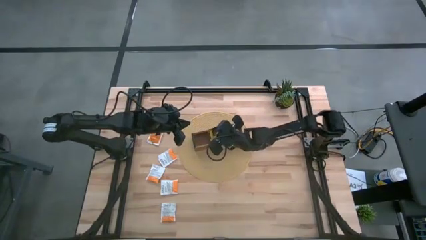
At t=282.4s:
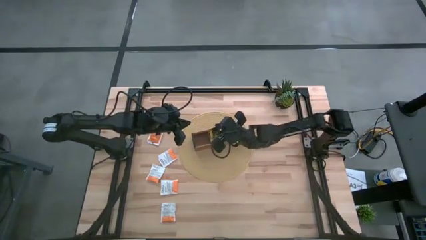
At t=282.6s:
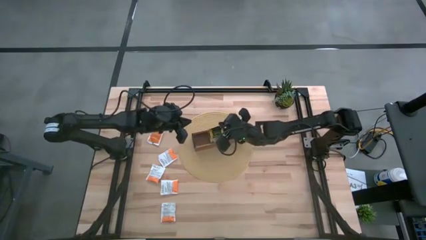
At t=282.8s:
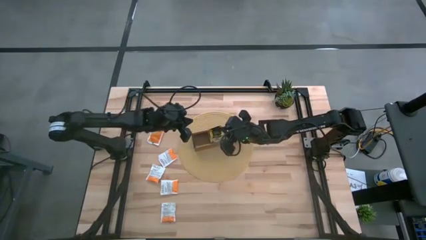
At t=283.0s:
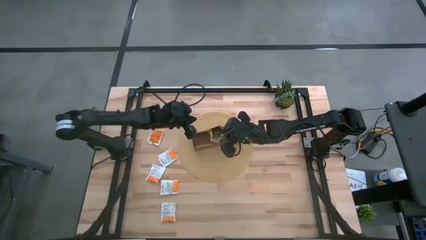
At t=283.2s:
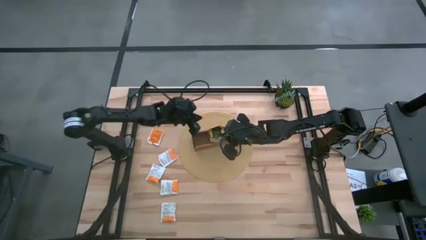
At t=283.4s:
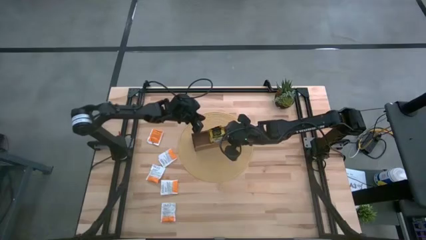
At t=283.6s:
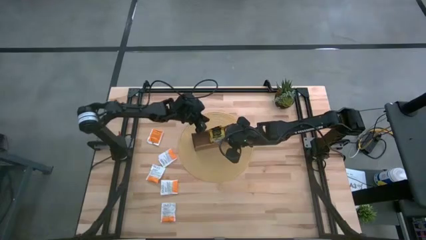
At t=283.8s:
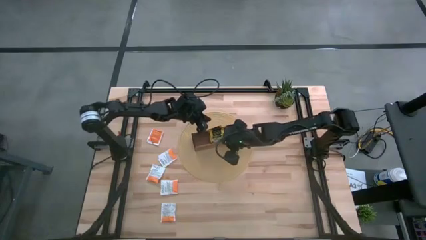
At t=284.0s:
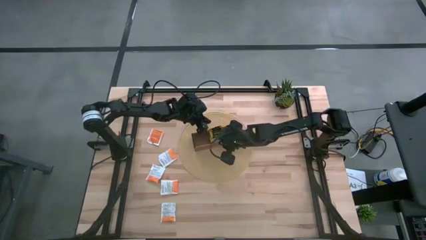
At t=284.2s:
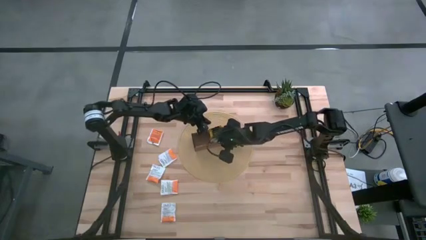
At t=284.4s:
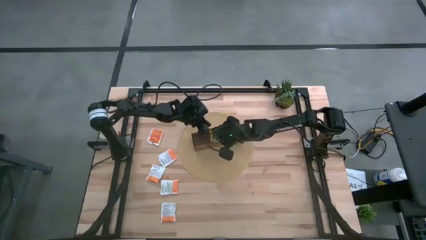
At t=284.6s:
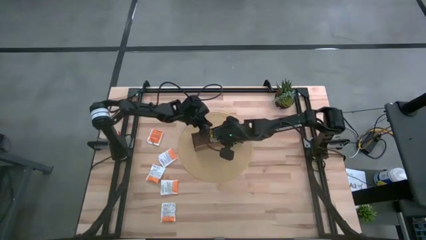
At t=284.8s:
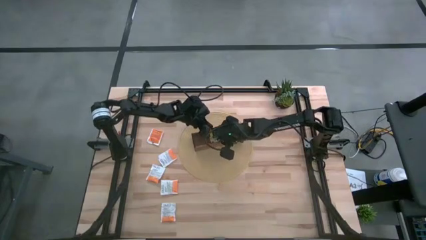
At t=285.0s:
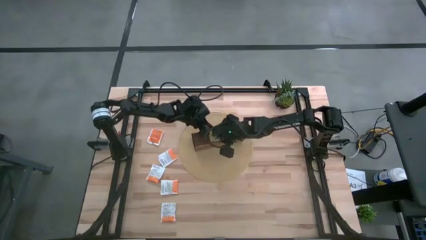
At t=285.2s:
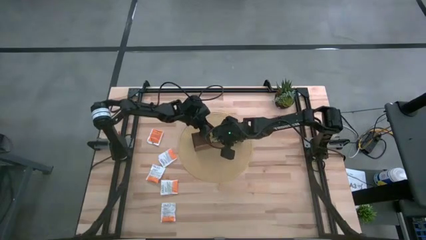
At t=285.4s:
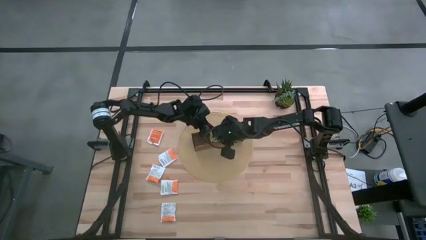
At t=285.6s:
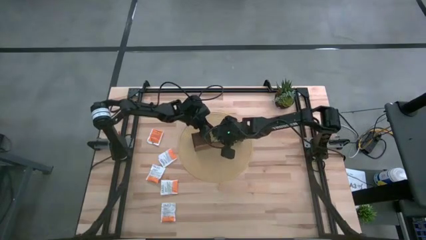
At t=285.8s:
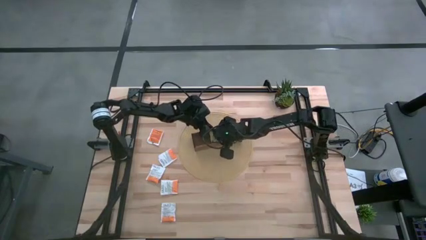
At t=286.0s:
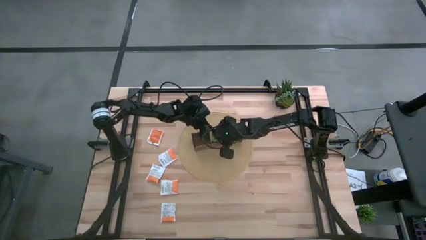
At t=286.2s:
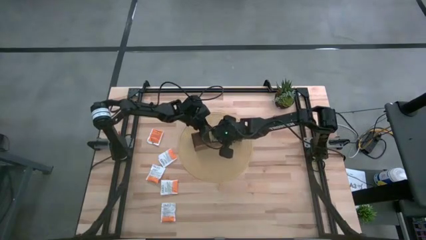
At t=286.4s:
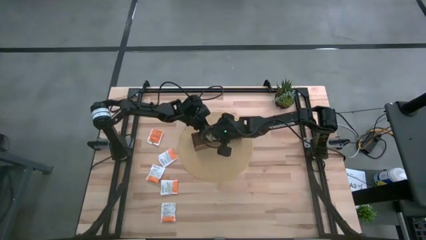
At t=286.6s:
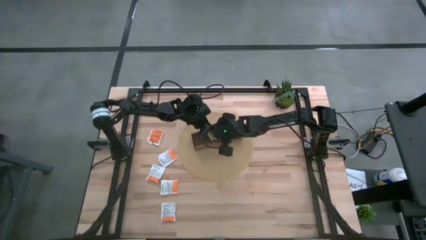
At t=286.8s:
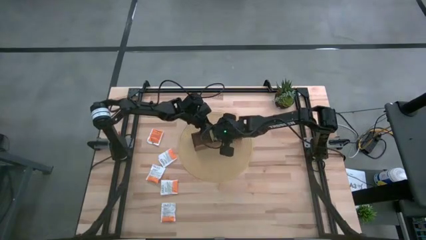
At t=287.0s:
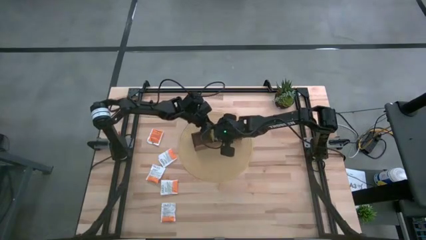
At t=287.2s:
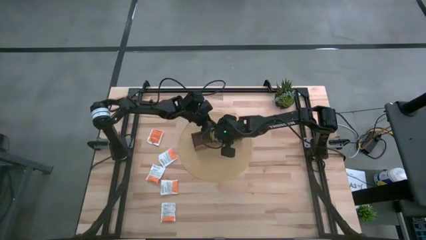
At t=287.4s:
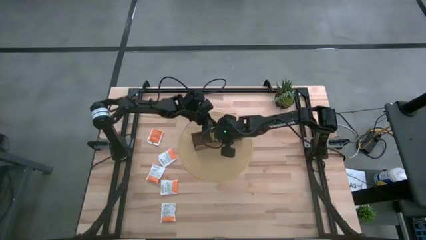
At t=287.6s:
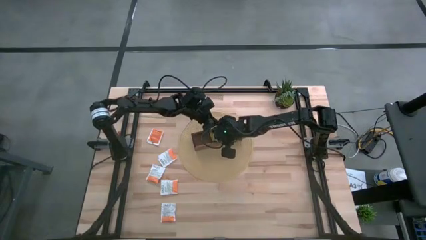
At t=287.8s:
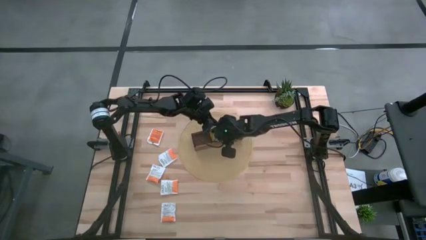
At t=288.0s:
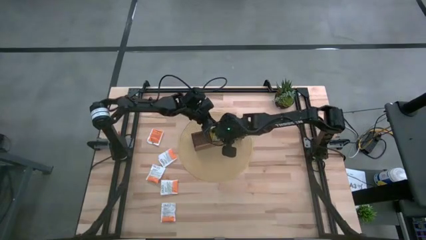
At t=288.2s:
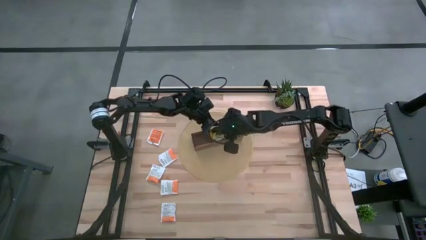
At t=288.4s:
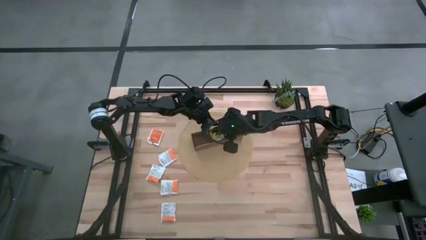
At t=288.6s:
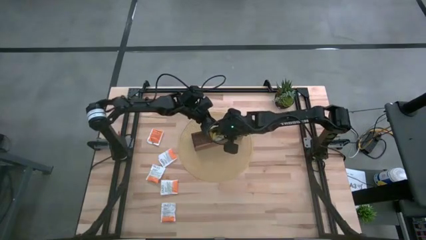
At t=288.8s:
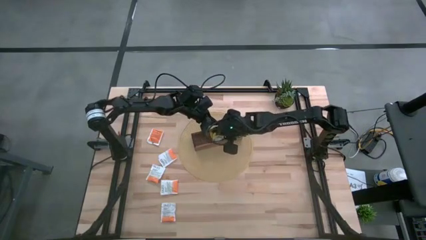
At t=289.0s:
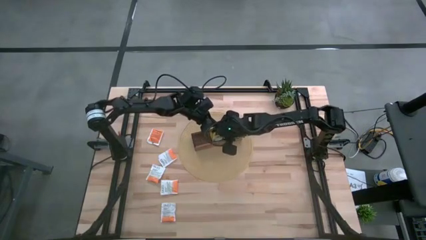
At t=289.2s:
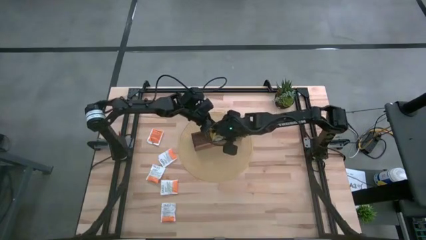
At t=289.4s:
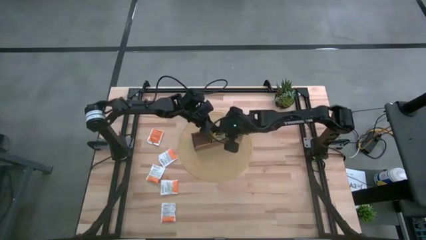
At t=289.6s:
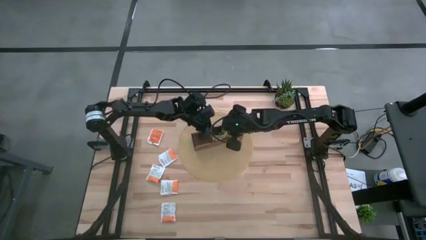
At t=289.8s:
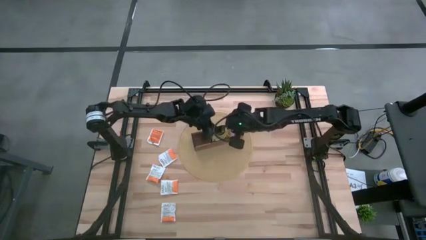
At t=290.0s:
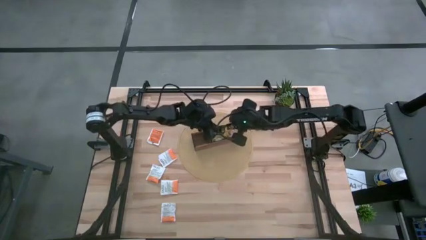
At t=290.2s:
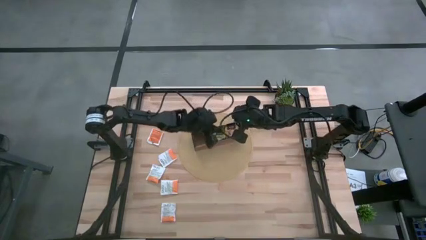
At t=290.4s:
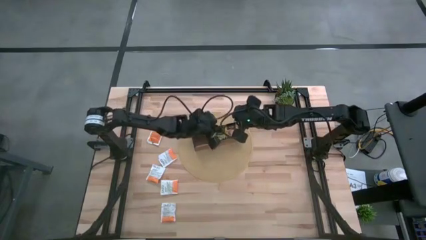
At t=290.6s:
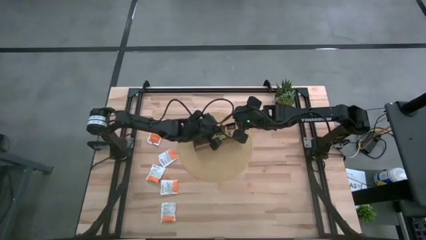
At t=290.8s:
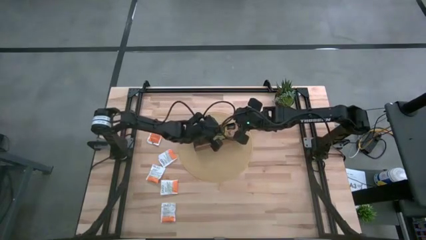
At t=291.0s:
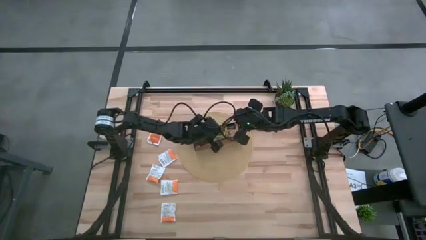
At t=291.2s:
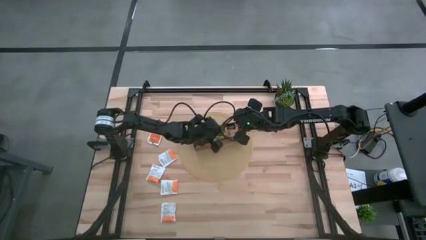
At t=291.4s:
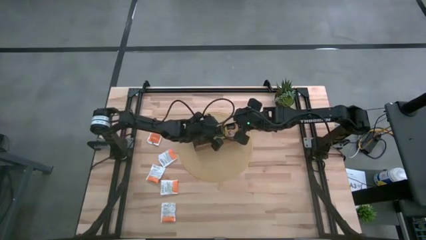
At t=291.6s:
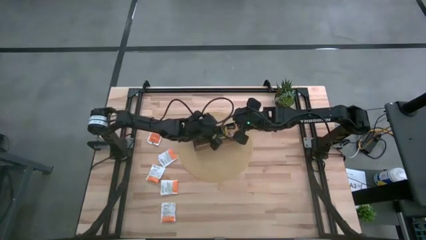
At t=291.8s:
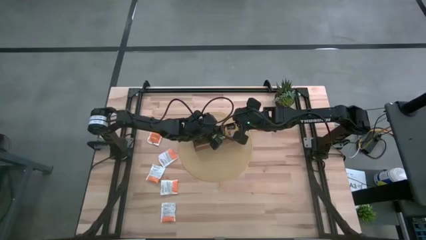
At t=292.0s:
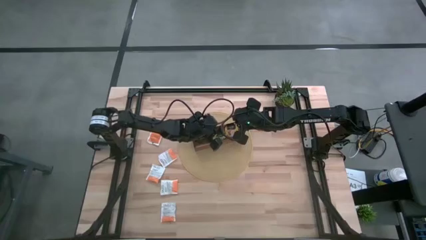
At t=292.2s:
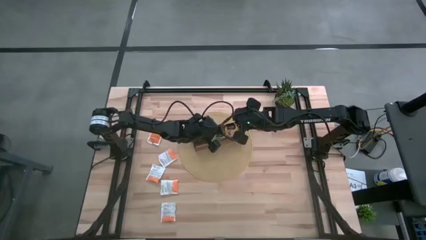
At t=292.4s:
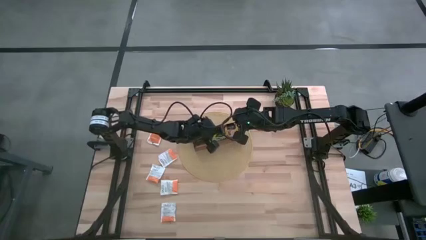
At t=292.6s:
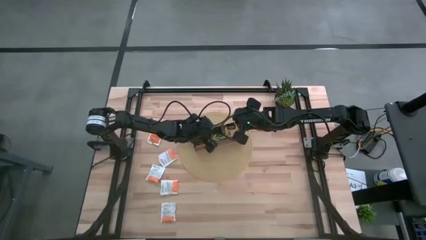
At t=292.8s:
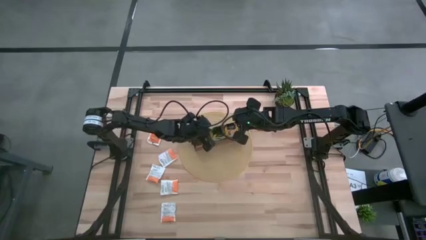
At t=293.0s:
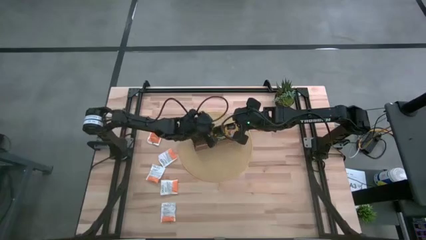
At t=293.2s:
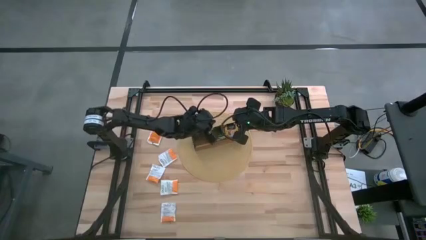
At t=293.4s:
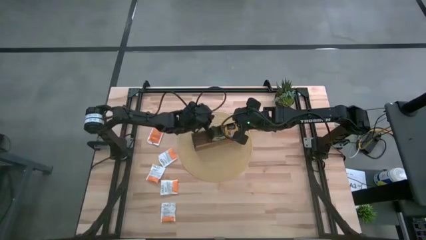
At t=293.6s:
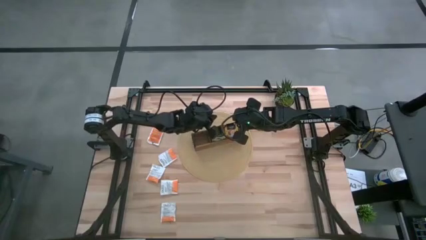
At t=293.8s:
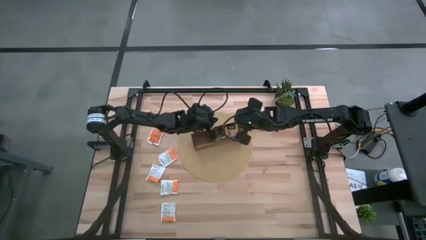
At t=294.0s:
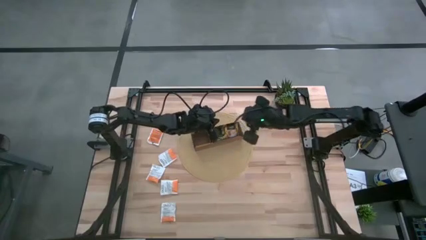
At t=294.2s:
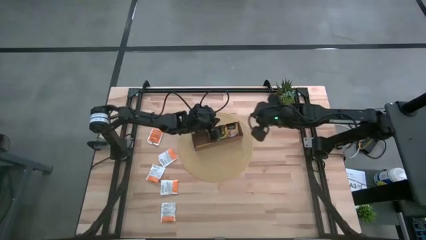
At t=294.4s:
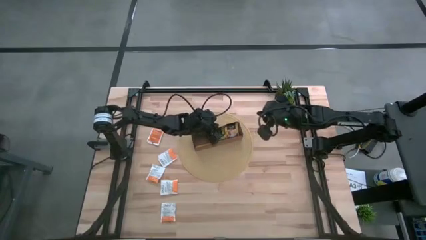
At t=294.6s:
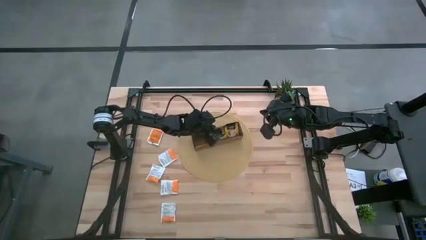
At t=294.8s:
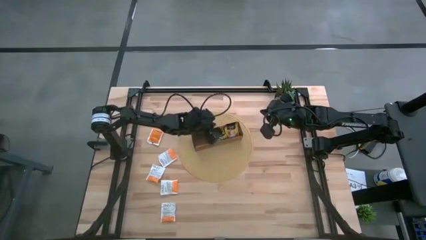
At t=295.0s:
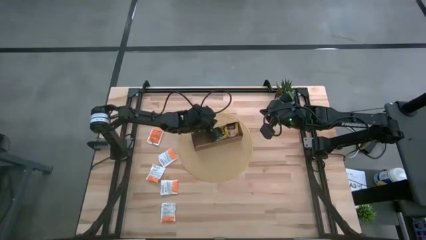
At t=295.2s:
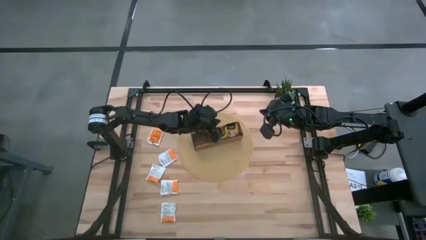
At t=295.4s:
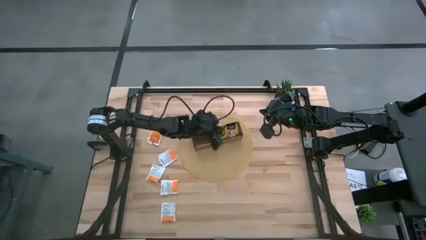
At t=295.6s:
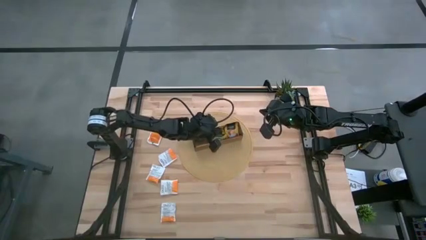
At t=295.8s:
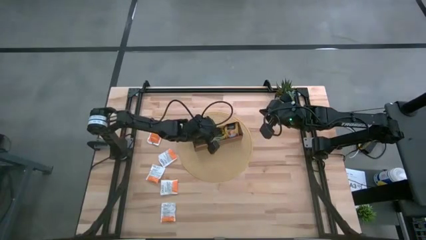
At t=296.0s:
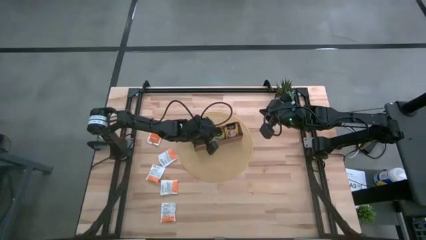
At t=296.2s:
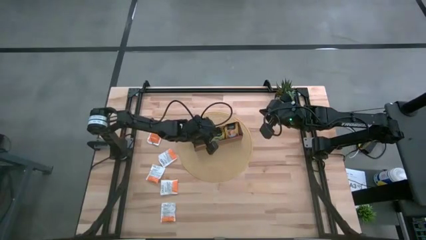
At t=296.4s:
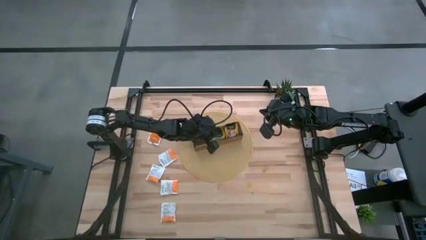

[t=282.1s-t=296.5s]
Task: Pick & Place Tea
Adjust the yellow tea bags in the wooden organizer

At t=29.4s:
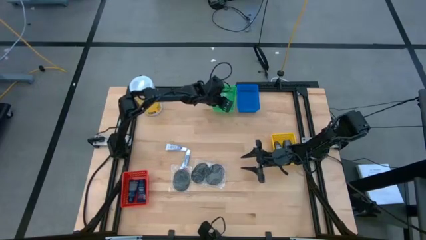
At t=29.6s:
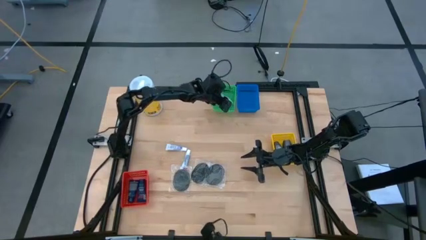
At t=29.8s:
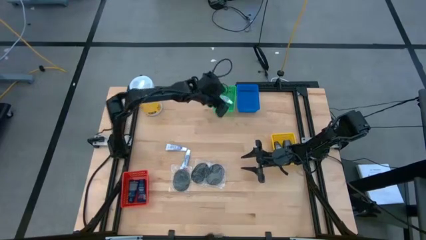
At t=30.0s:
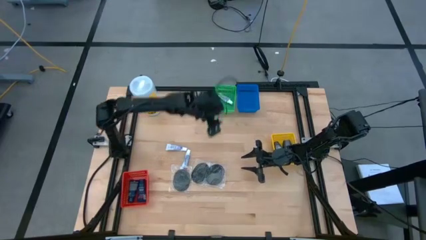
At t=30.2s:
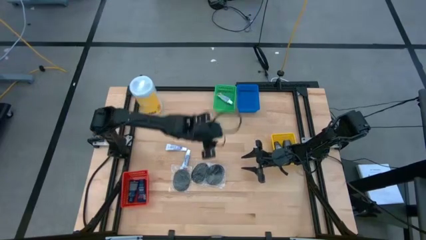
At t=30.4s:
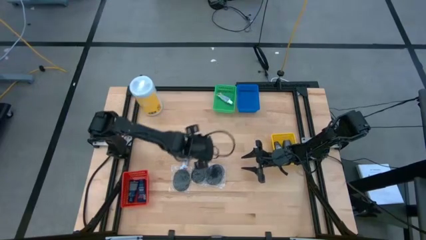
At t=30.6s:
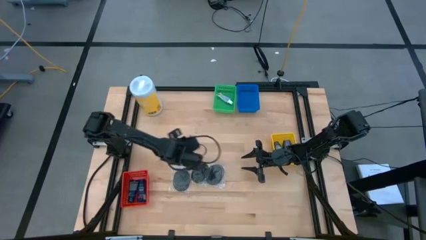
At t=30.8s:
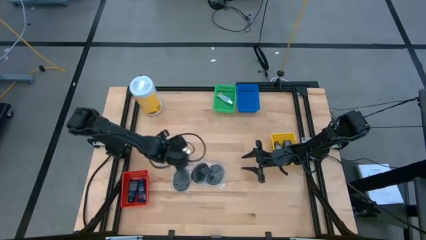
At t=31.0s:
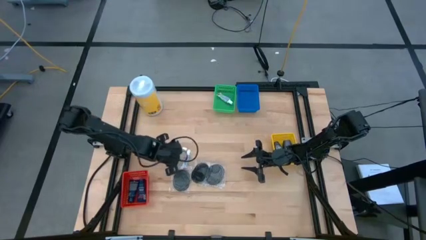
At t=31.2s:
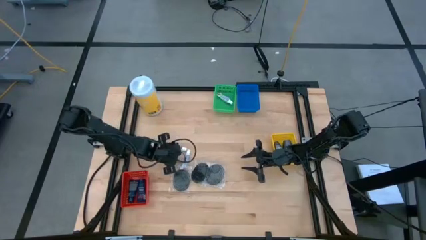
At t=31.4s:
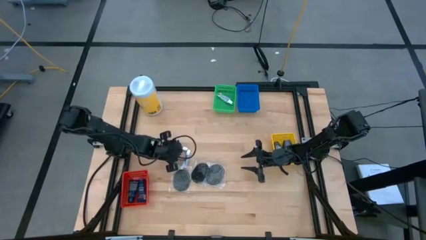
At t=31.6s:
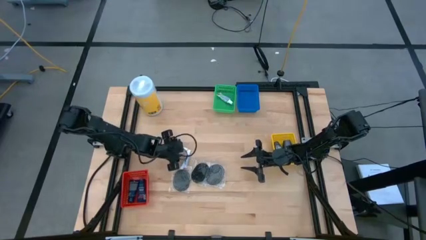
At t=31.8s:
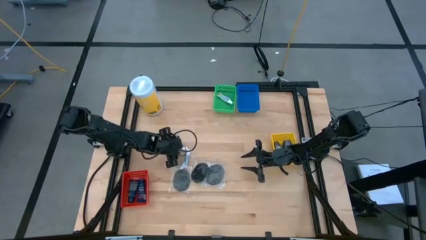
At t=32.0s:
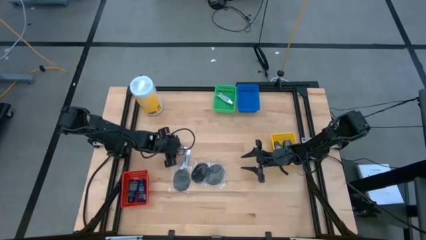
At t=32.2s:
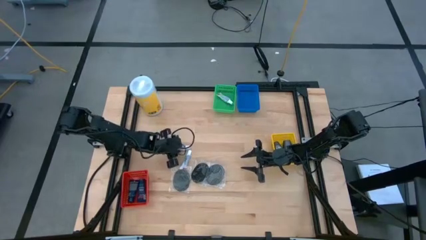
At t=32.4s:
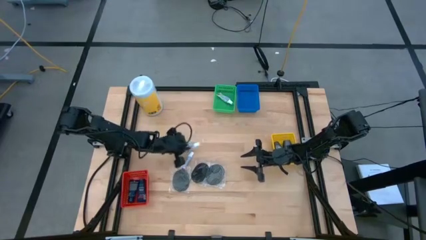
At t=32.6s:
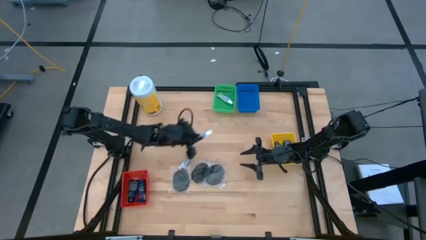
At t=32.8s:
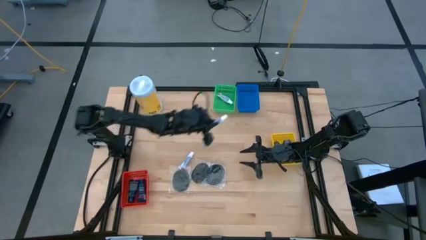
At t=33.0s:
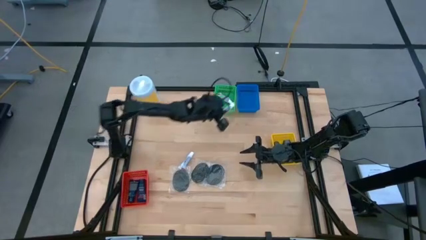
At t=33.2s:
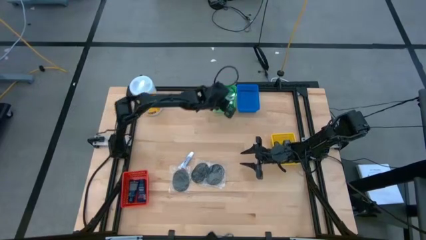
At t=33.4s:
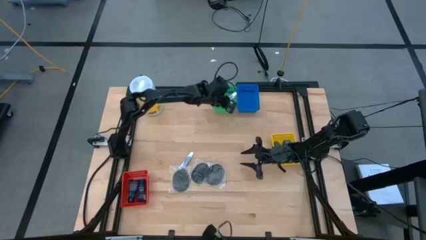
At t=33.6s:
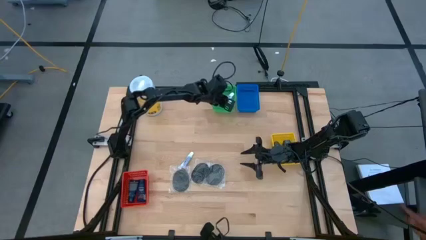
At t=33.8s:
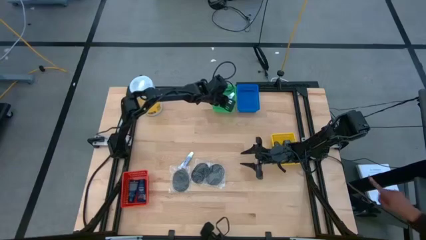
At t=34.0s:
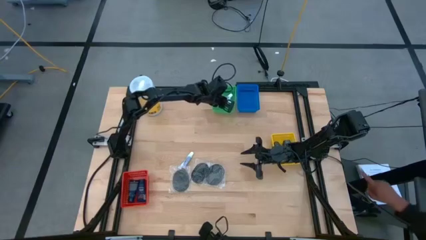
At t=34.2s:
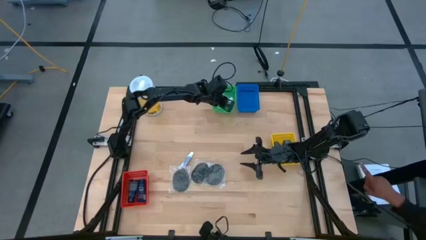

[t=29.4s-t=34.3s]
Task: Pick & Place Travel size toiletries
Put the white toothpaste into the green basket
